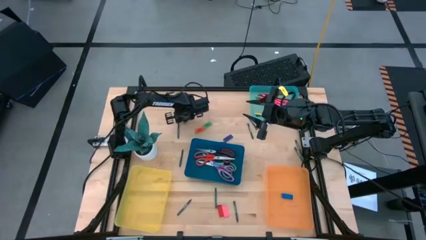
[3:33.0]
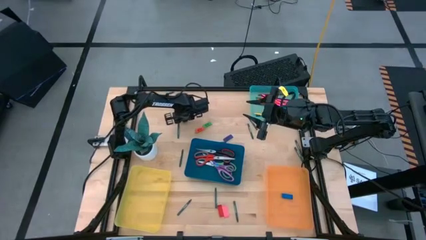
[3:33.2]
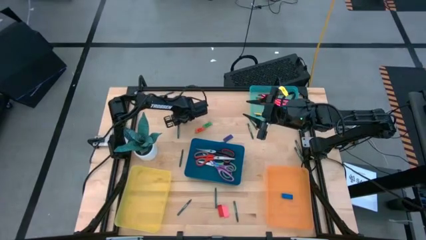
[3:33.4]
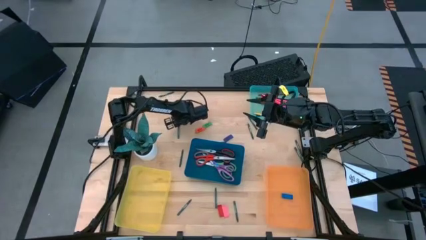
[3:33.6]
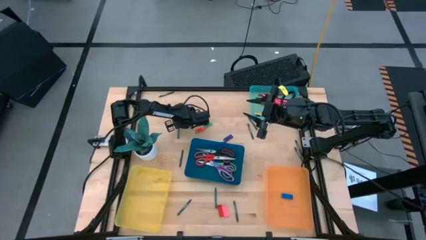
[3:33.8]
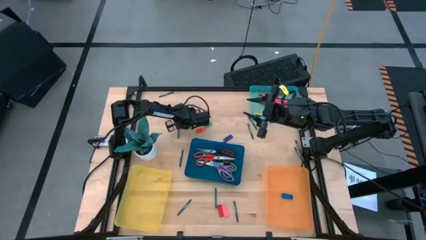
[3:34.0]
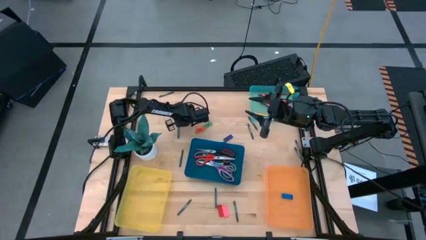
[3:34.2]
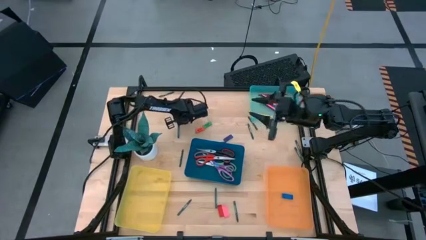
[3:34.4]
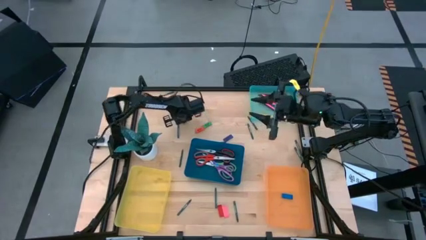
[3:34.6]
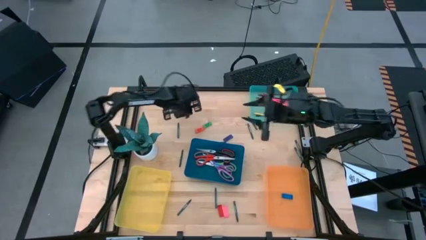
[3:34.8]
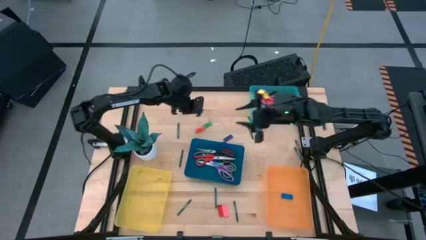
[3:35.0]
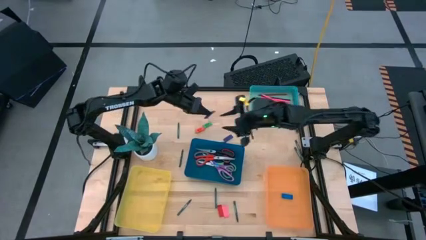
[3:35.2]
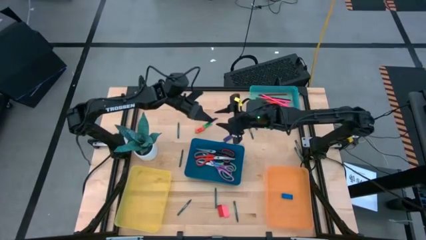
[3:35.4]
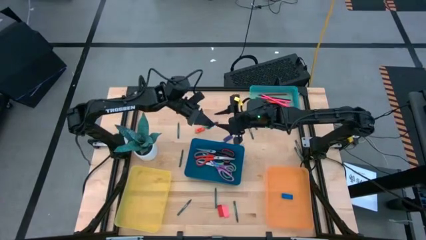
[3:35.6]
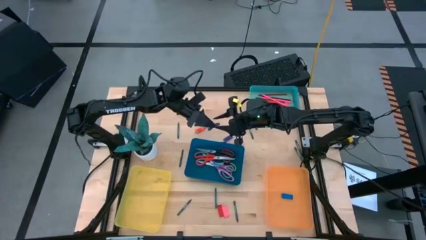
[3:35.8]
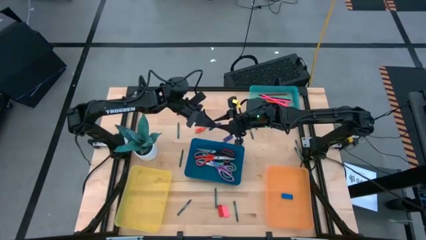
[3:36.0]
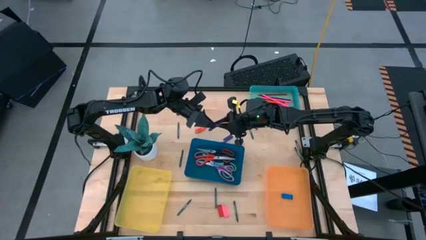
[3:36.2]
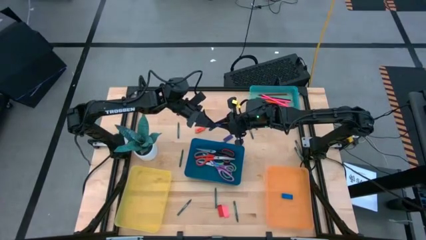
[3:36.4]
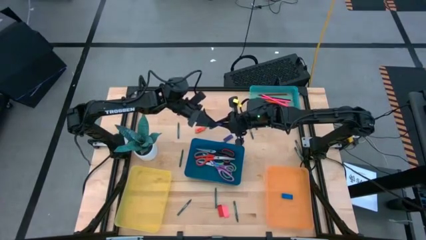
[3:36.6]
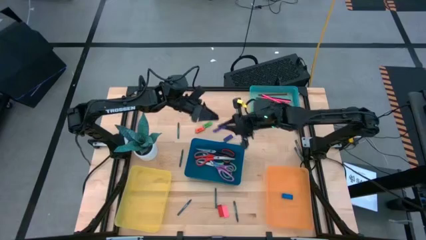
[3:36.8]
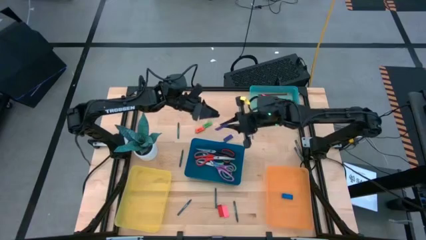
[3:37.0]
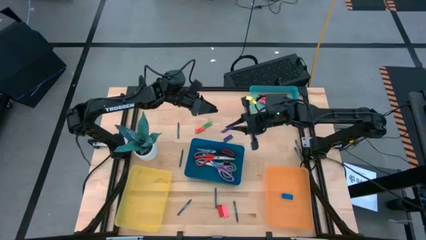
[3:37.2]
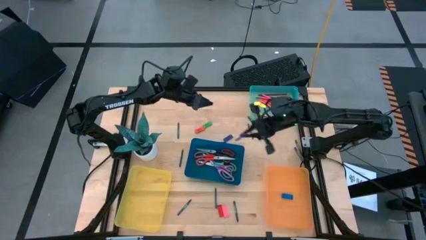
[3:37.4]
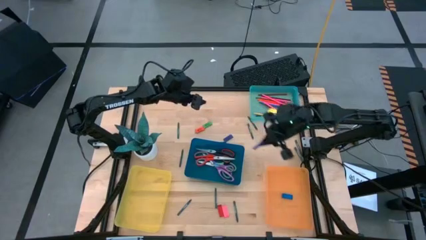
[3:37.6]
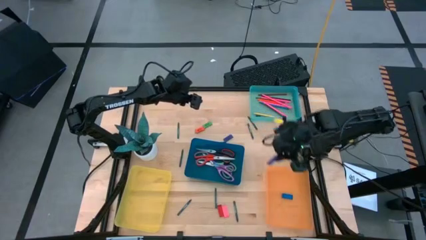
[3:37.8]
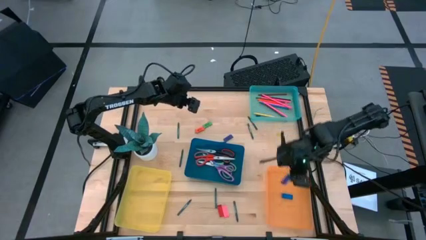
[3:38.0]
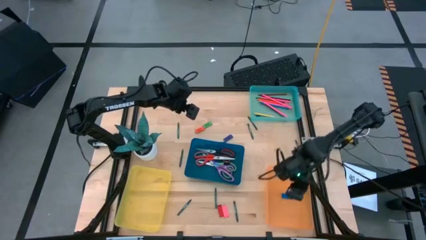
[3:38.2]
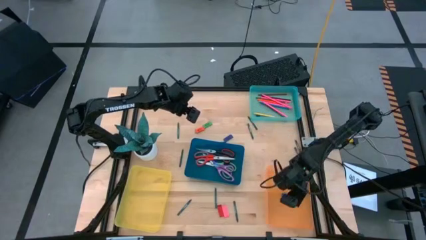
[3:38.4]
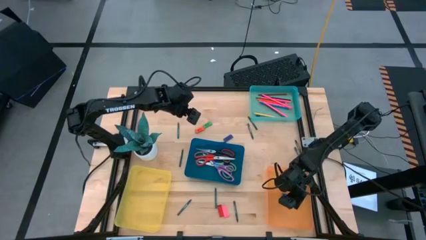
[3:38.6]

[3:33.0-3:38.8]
Task: Sort crayons/erasers/pens/pencils in bins
Put the purple eraser into the orange bin

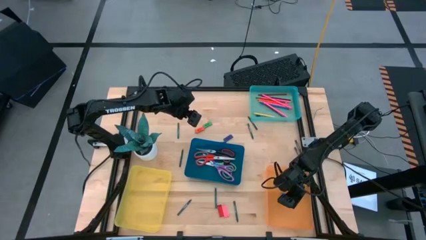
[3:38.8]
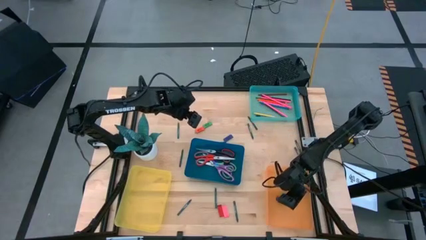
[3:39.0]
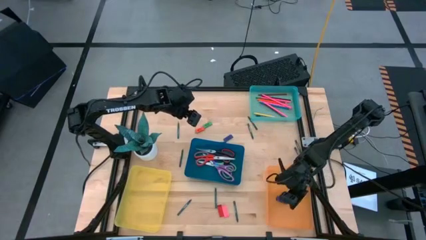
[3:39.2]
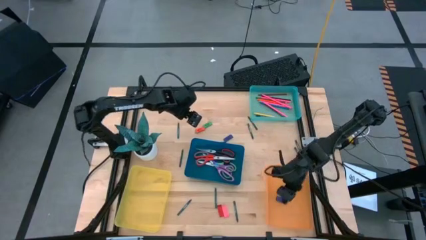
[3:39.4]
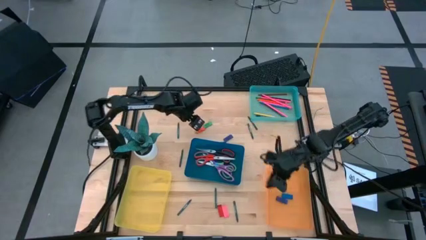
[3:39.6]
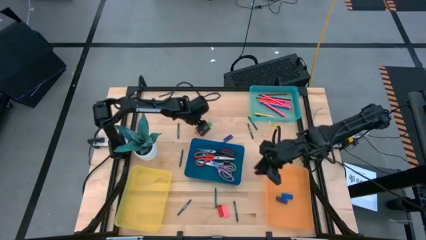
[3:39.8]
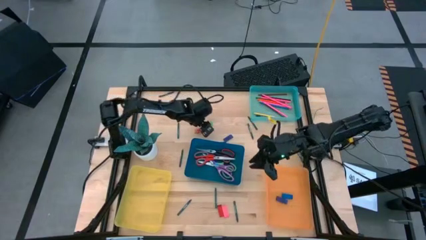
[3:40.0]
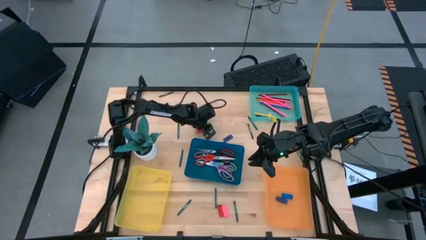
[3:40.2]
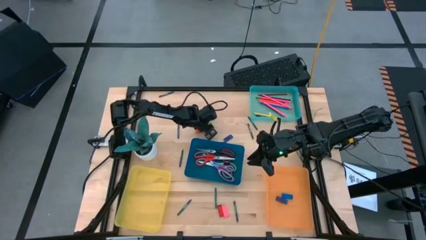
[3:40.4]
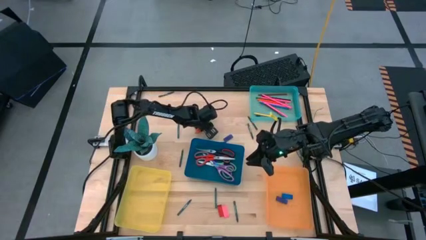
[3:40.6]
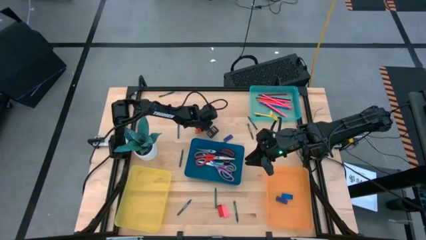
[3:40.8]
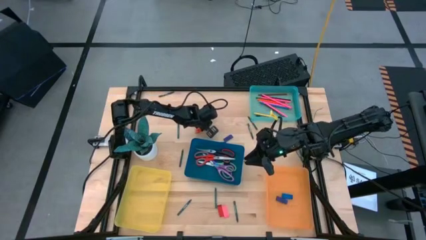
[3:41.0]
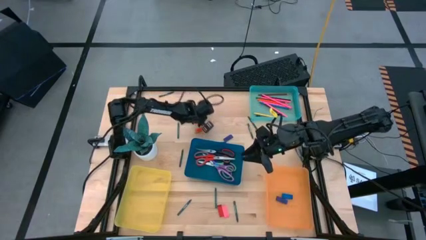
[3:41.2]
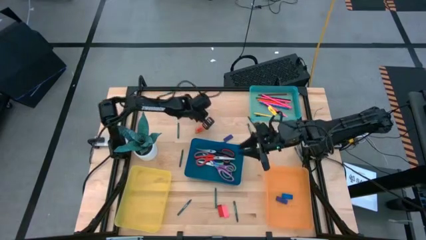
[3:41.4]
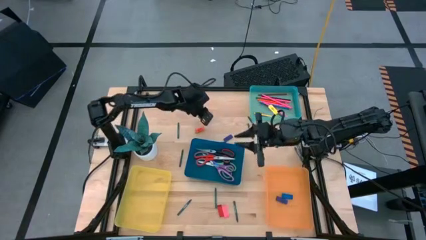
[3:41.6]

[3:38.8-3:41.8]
Put the green eraser into the orange bin

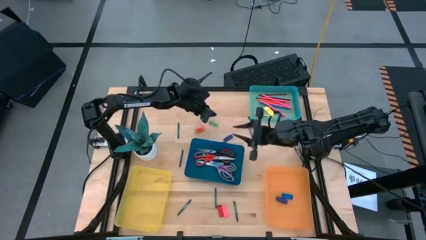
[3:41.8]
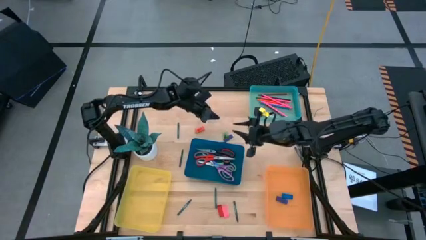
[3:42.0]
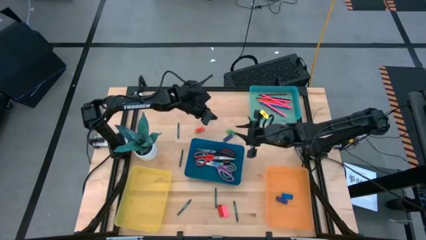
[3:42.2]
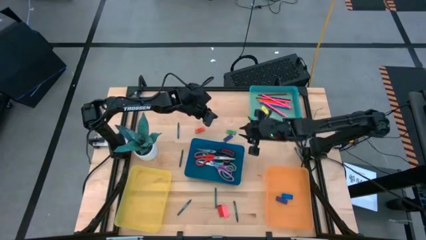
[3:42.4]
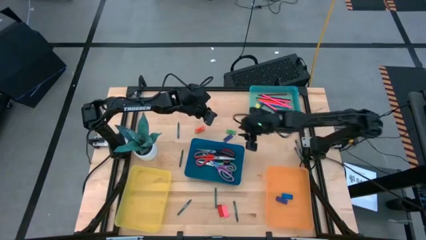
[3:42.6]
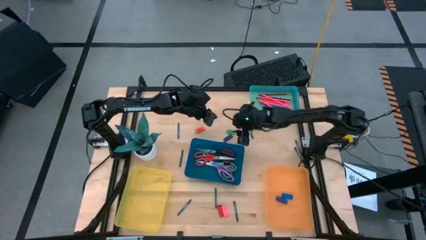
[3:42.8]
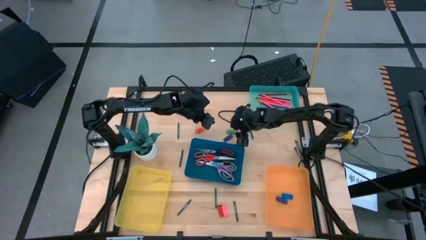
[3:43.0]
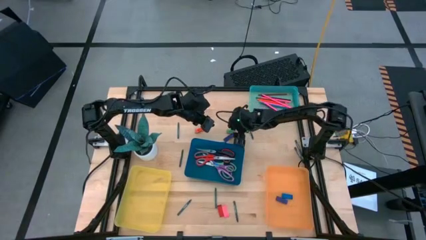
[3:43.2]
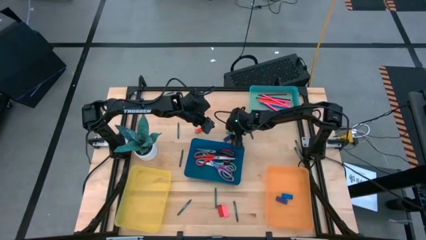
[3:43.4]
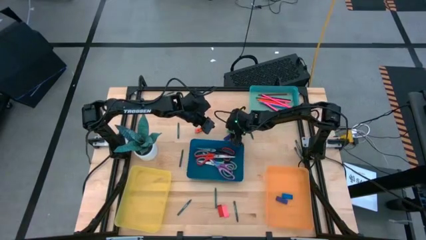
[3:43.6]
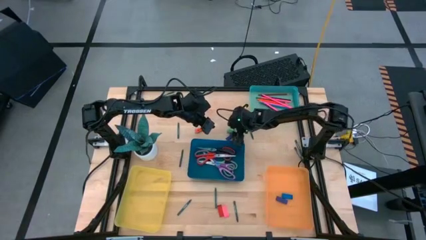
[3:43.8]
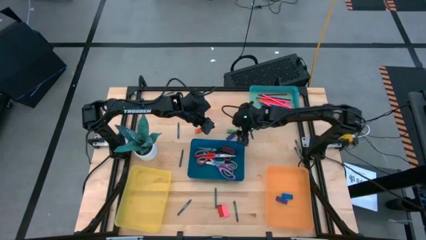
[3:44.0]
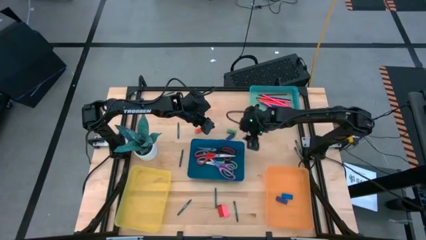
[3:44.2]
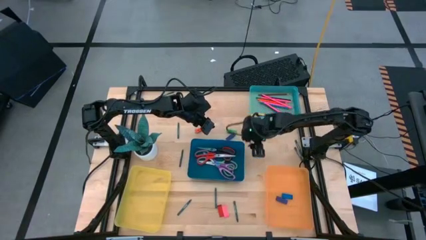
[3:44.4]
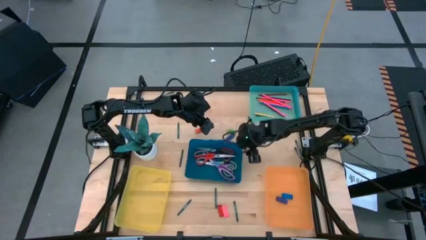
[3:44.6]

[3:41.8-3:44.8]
Adjust the blue bin

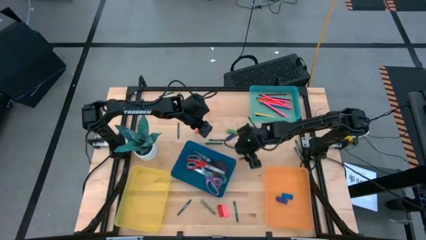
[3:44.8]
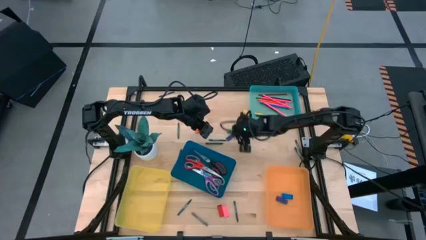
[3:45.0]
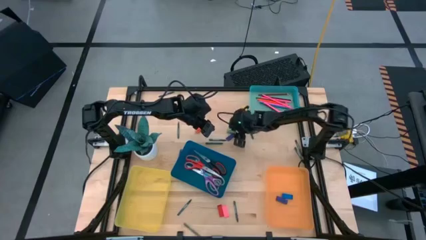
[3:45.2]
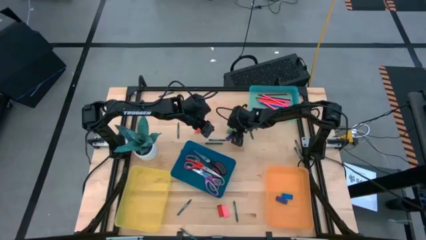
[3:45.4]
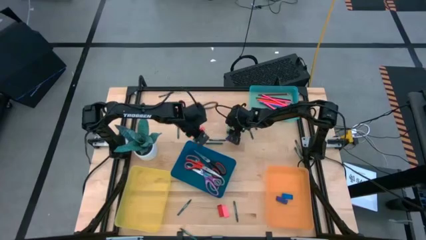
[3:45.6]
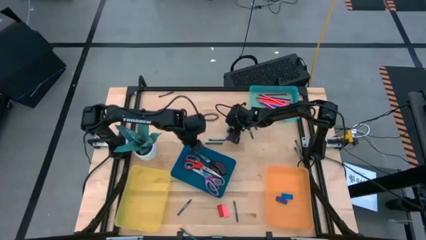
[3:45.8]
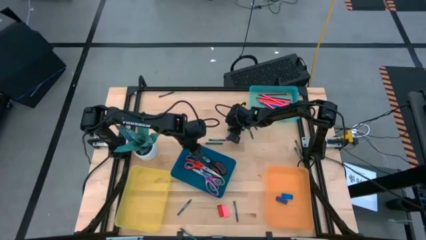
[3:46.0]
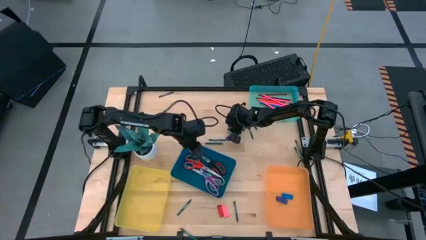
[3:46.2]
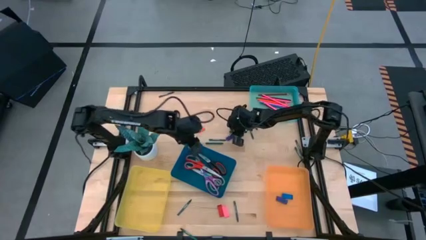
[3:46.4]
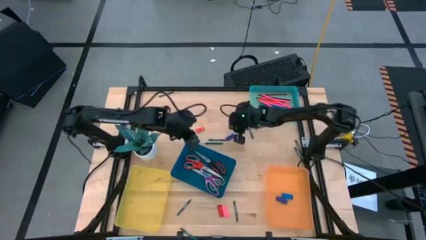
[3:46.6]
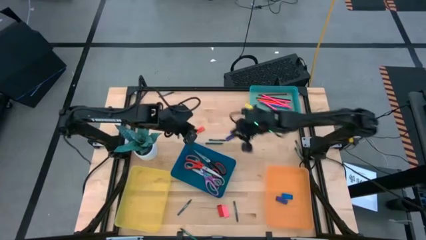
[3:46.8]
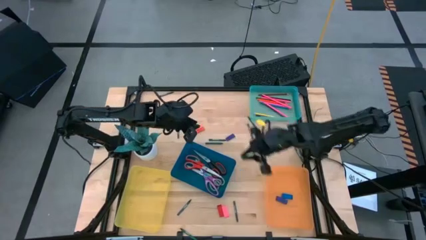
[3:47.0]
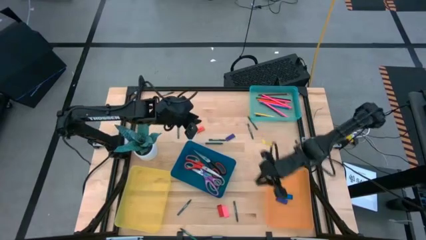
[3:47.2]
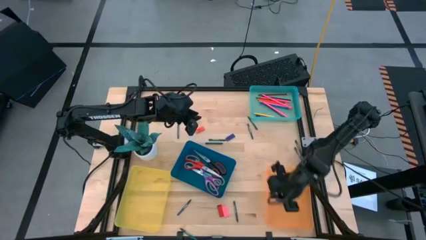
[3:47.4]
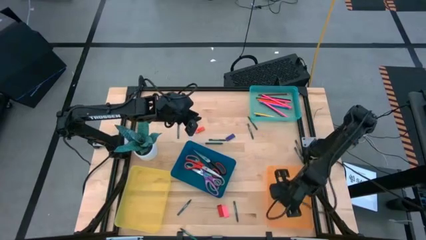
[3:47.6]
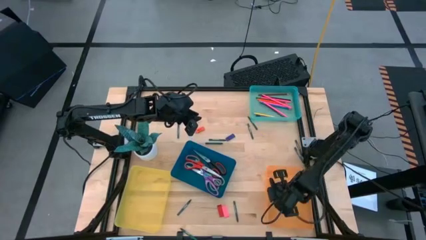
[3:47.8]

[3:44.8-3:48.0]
Put the green eraser into the orange bin
